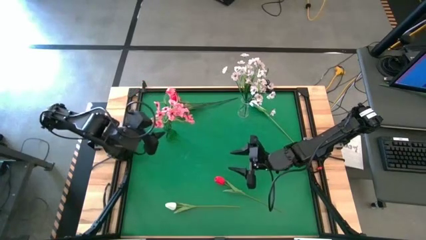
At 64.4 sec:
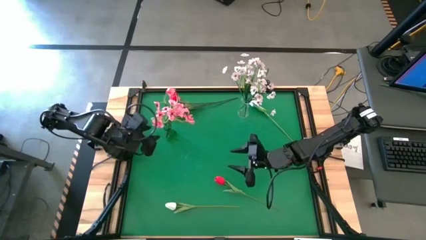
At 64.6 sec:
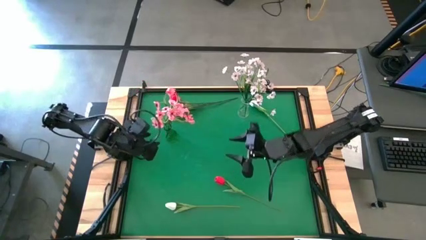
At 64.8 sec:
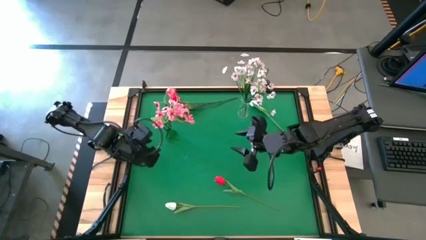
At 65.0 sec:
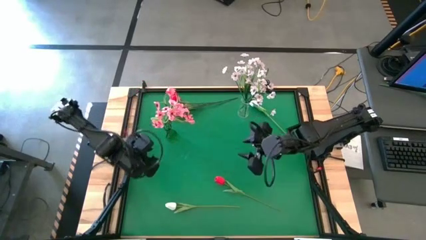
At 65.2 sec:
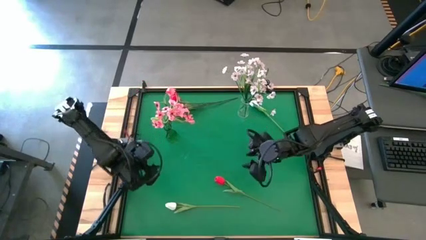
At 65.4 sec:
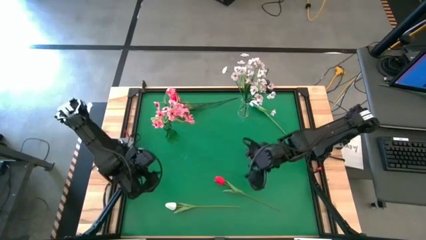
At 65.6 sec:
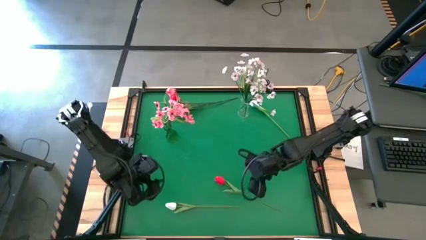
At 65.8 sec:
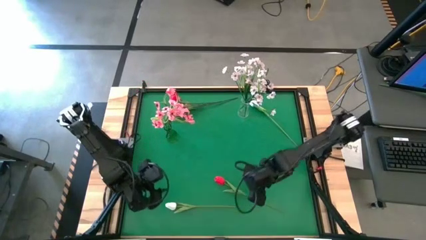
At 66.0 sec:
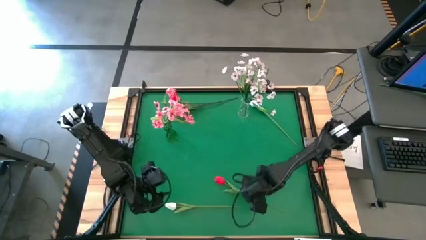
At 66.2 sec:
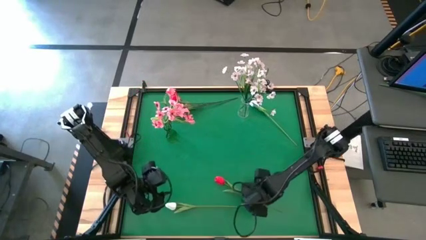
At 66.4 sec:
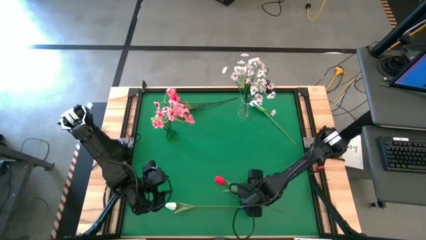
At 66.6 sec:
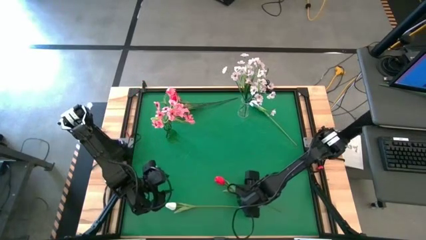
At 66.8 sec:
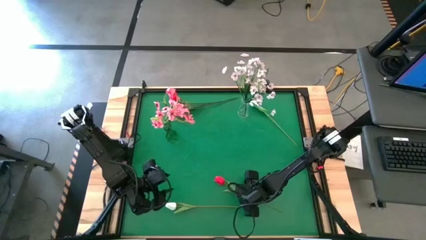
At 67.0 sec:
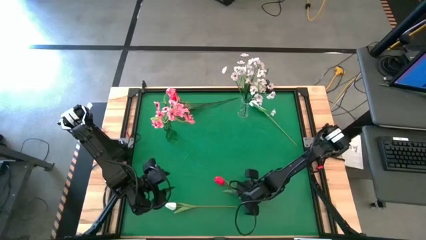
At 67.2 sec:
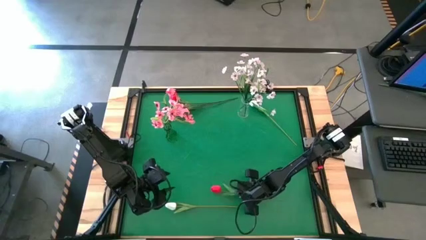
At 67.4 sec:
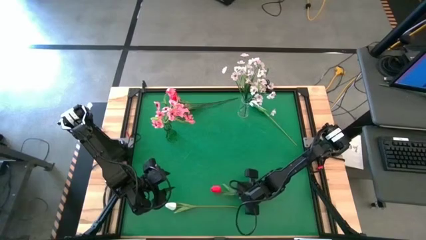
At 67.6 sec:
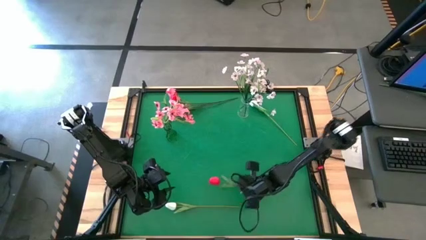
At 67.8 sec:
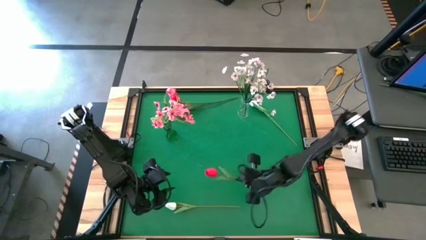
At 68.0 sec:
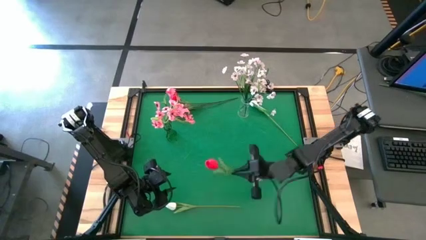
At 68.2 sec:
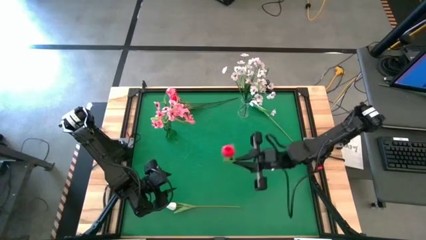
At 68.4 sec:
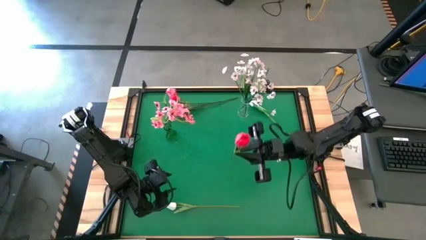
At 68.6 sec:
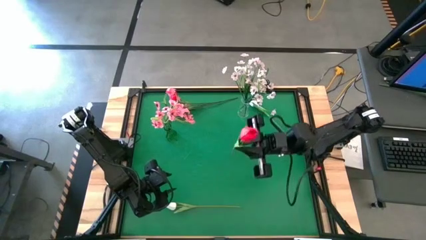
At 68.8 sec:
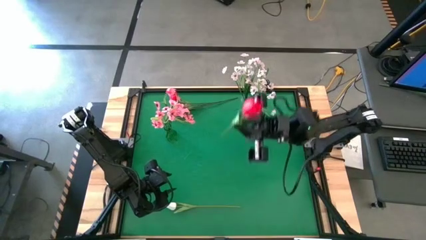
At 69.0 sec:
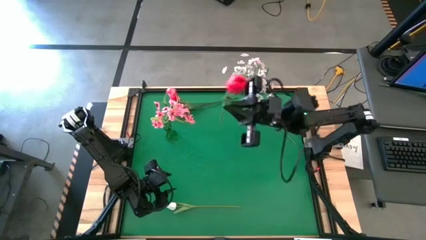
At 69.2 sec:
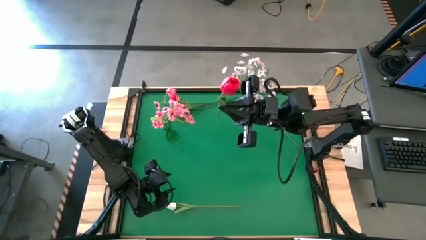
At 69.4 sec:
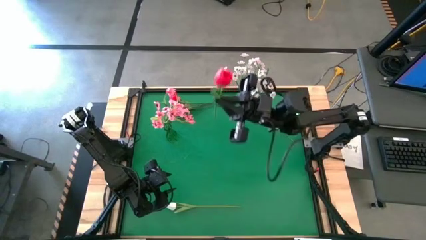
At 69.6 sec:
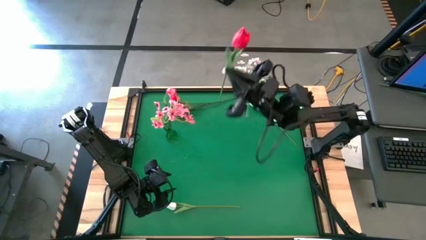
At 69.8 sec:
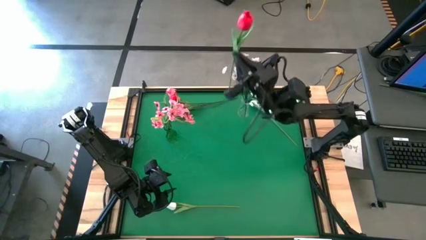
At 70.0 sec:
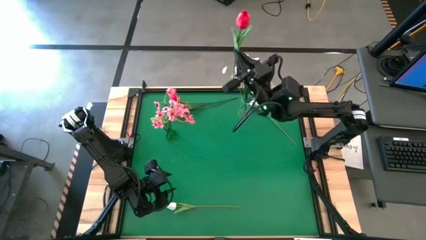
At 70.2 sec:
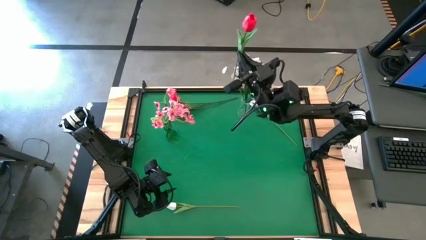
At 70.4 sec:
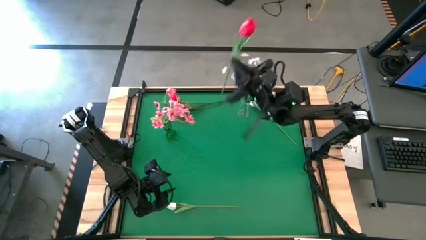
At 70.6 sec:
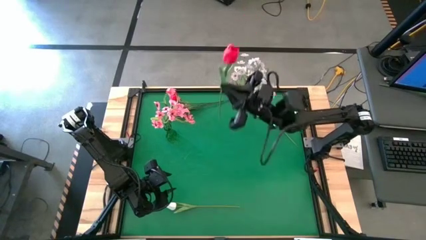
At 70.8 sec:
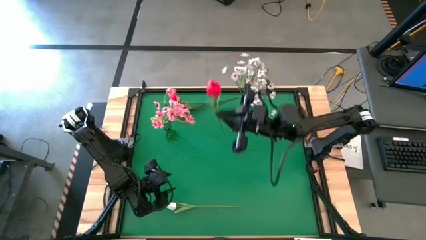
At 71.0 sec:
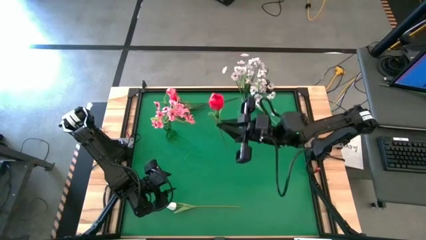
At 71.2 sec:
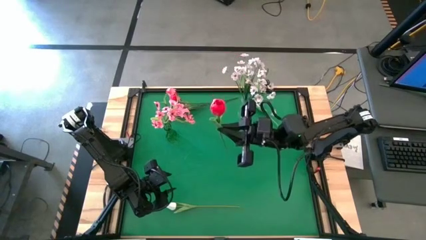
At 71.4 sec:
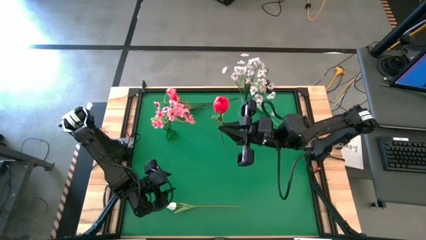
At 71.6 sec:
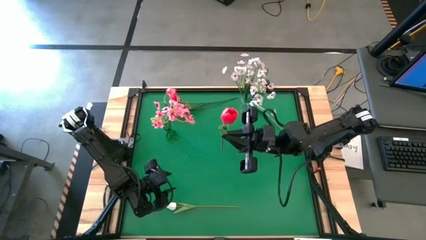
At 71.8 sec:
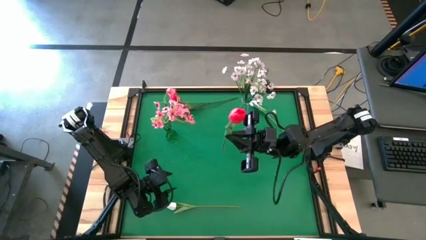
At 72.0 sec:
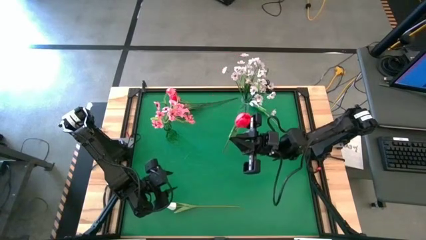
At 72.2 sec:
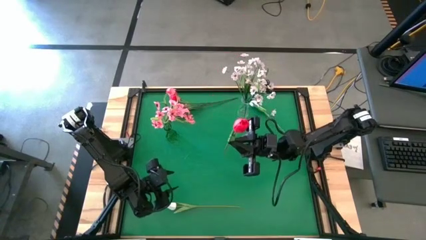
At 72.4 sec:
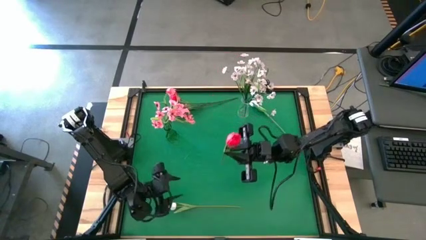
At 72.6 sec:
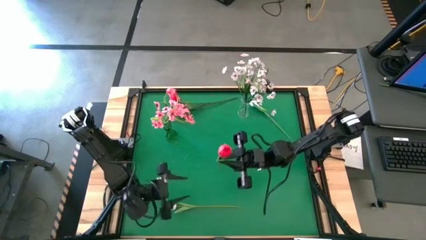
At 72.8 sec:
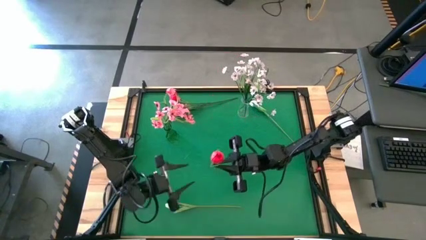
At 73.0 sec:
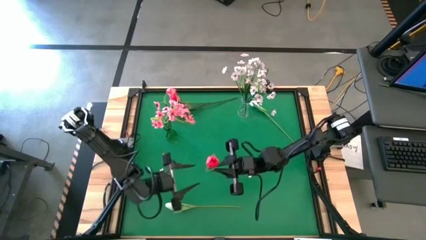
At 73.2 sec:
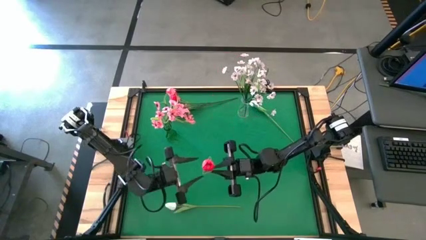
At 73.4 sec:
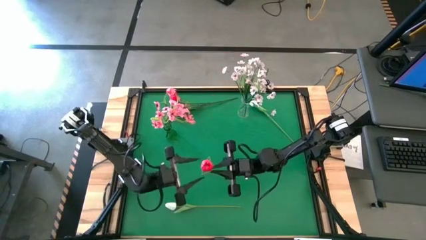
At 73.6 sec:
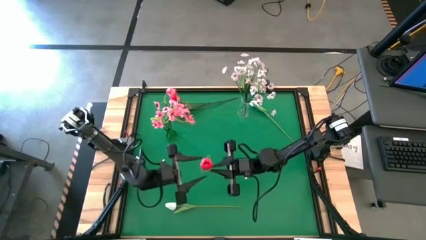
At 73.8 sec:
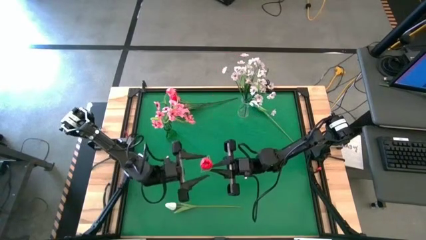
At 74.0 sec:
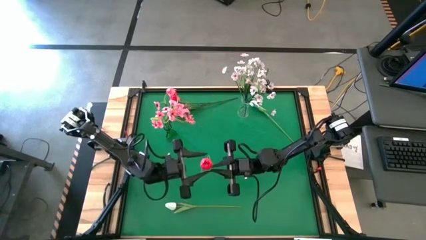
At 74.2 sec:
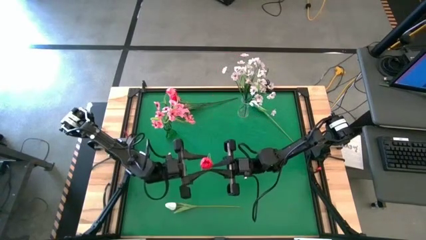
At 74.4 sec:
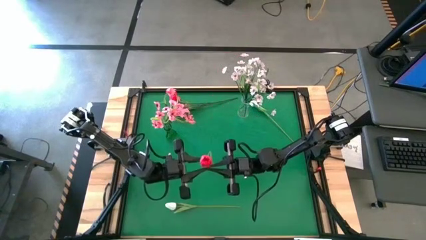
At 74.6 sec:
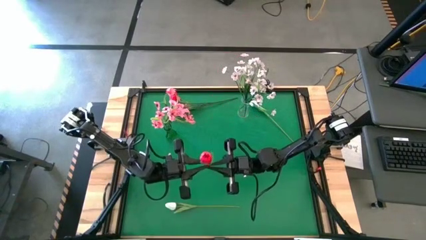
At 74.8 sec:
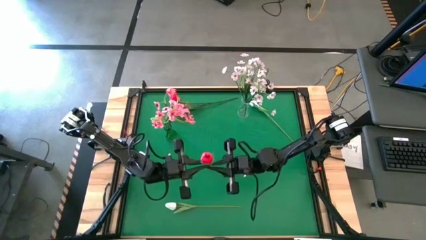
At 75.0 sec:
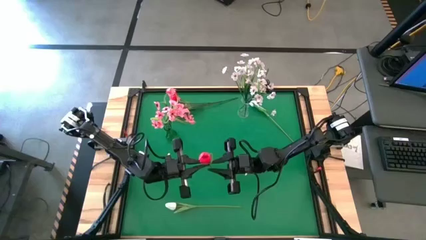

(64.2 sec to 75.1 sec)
Task: Sort flowers into vase by color
Put the red flower into the green vase
